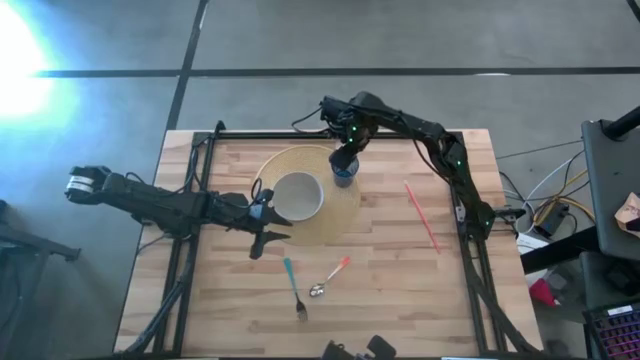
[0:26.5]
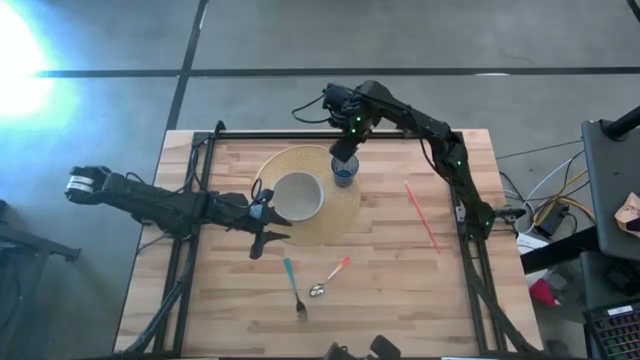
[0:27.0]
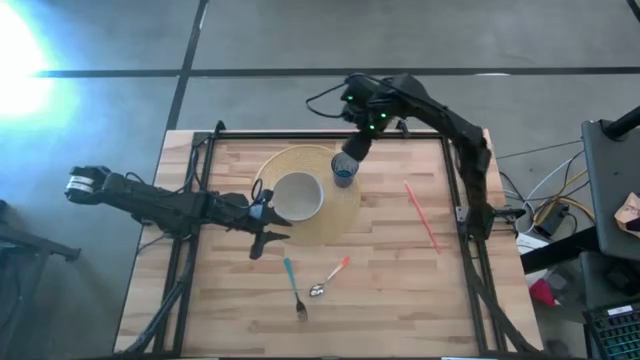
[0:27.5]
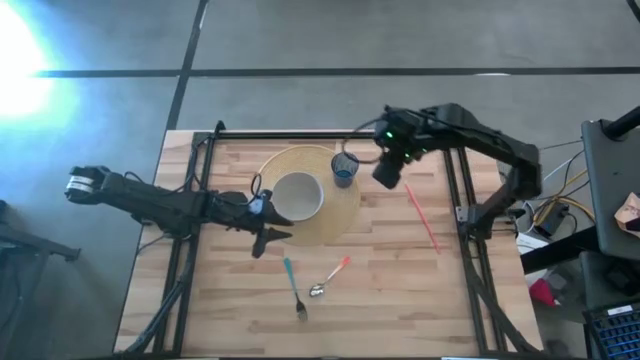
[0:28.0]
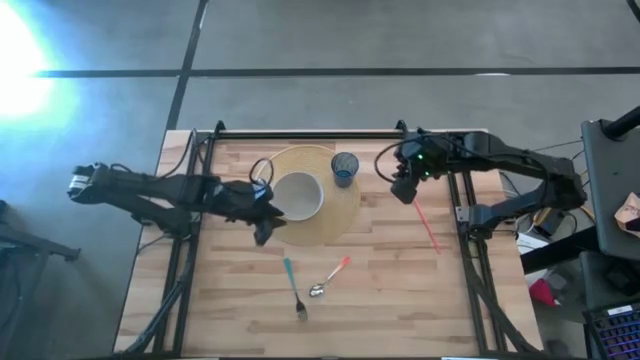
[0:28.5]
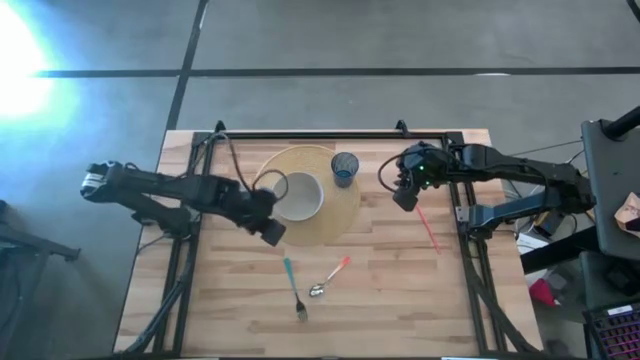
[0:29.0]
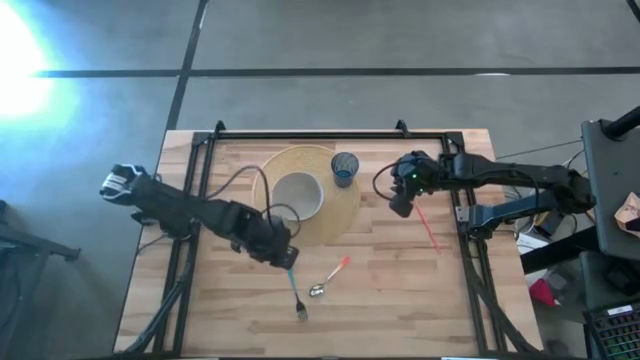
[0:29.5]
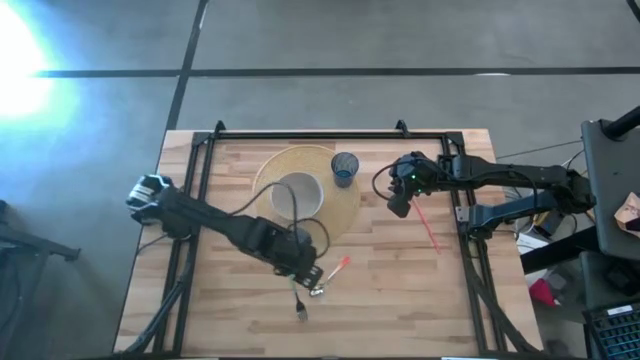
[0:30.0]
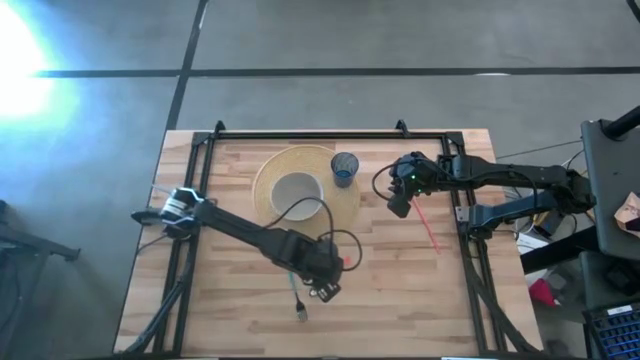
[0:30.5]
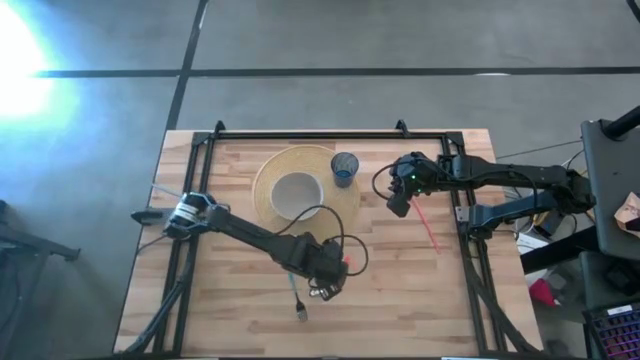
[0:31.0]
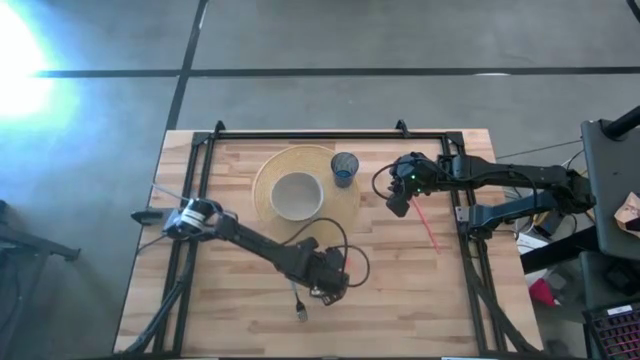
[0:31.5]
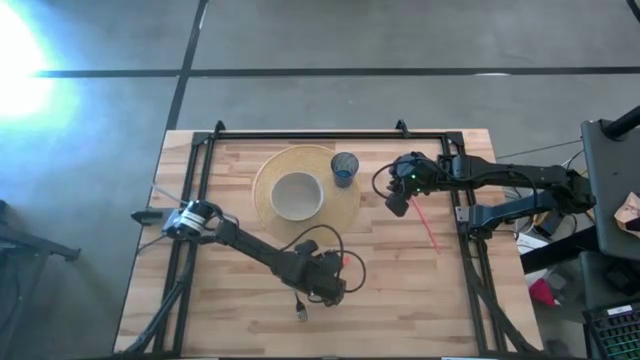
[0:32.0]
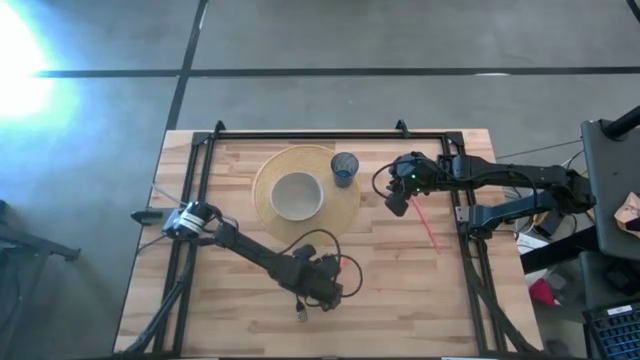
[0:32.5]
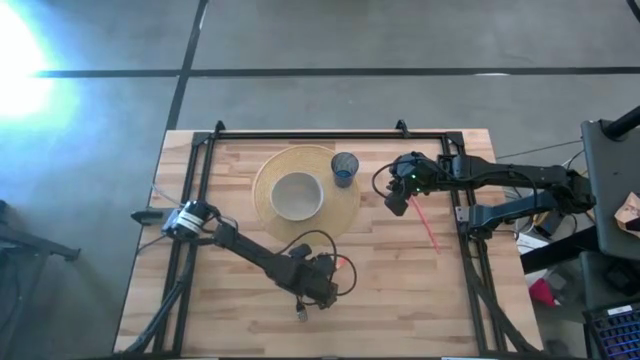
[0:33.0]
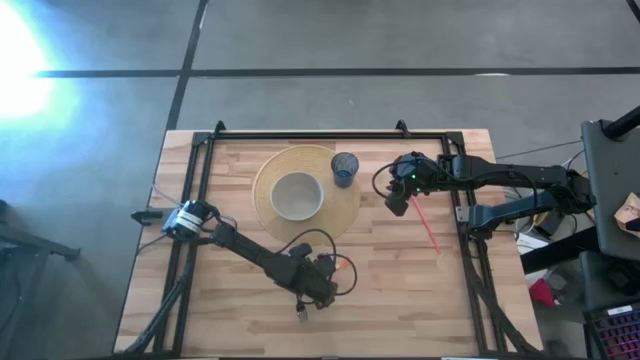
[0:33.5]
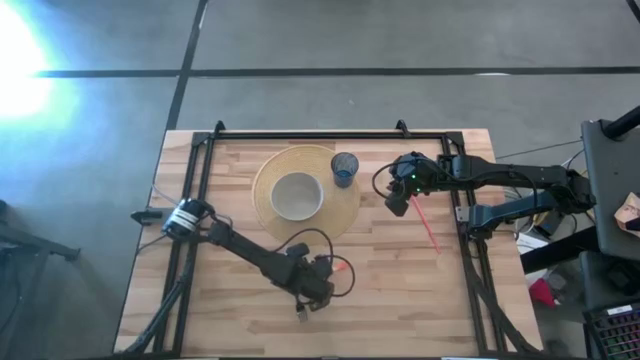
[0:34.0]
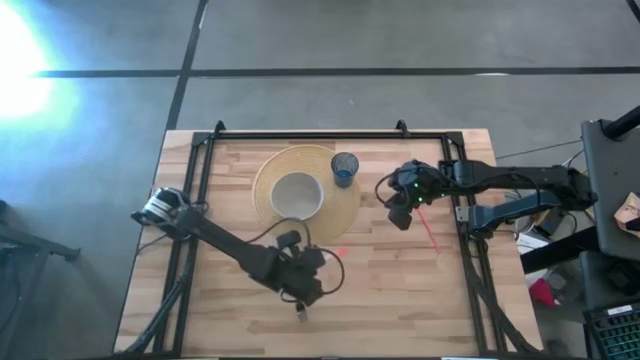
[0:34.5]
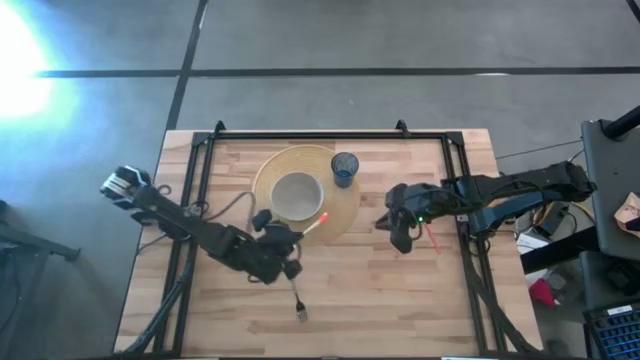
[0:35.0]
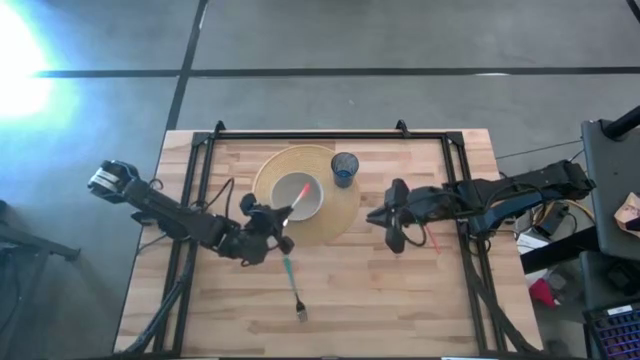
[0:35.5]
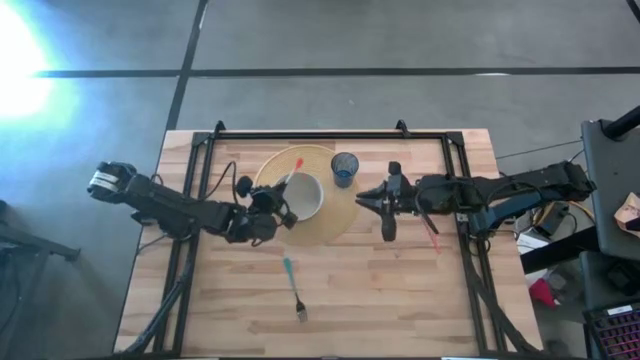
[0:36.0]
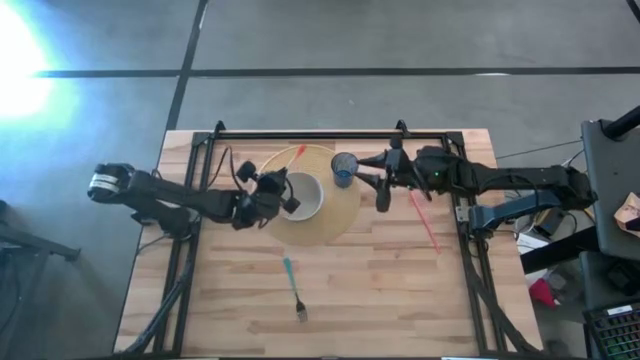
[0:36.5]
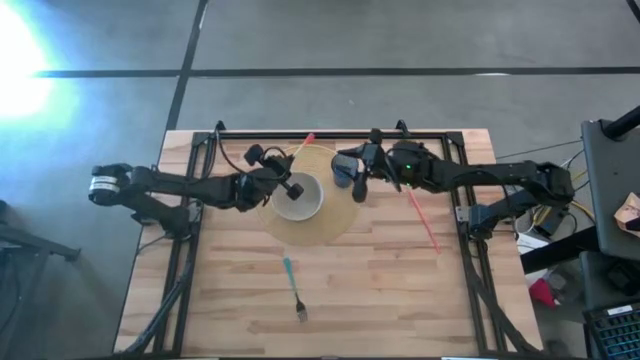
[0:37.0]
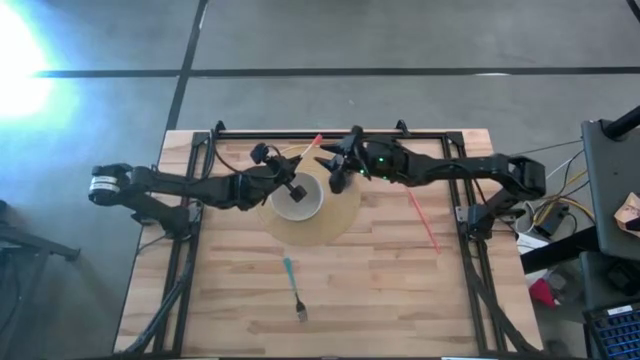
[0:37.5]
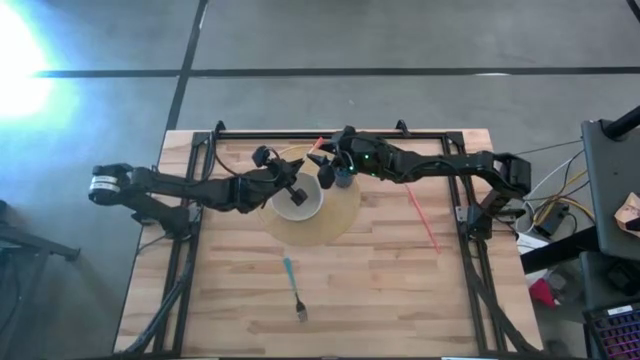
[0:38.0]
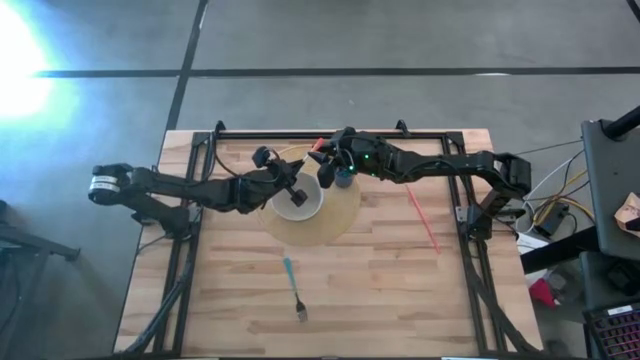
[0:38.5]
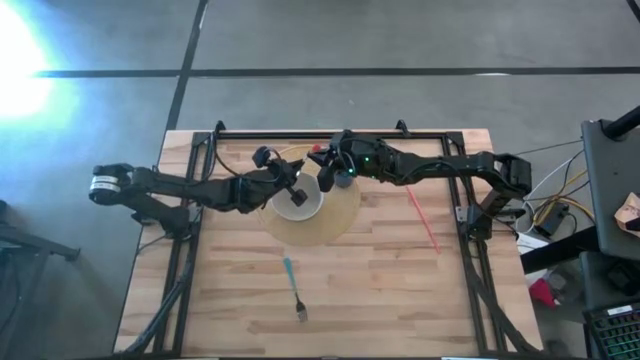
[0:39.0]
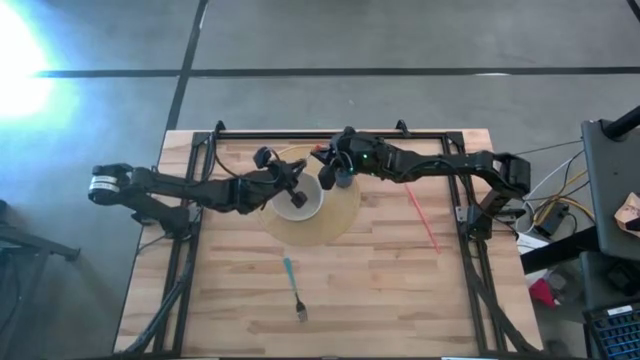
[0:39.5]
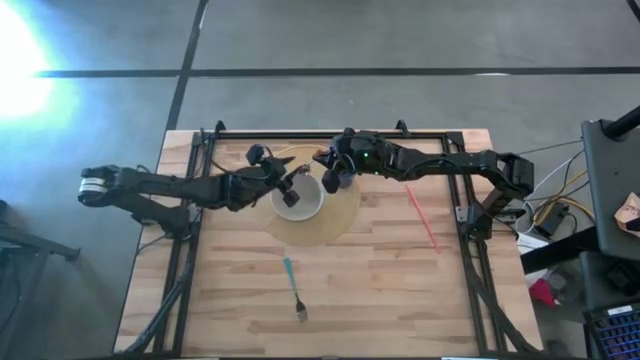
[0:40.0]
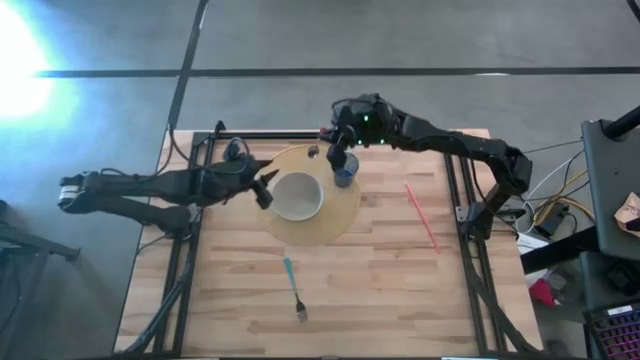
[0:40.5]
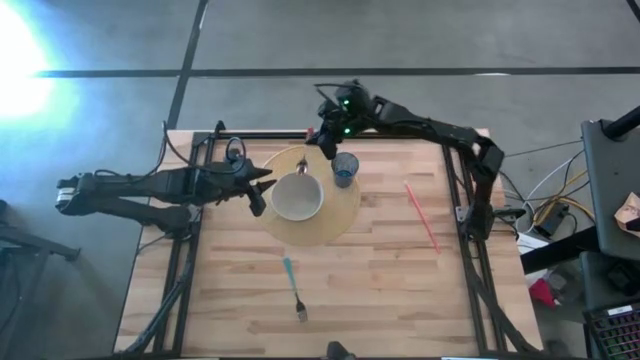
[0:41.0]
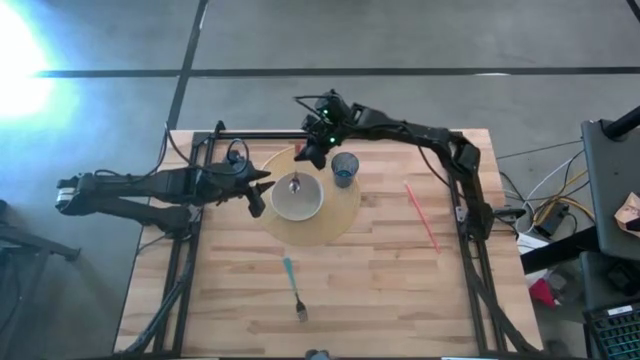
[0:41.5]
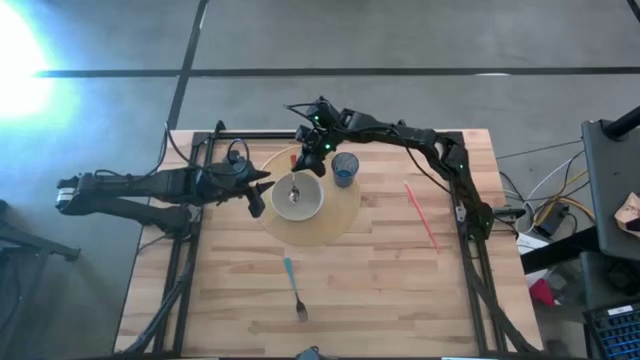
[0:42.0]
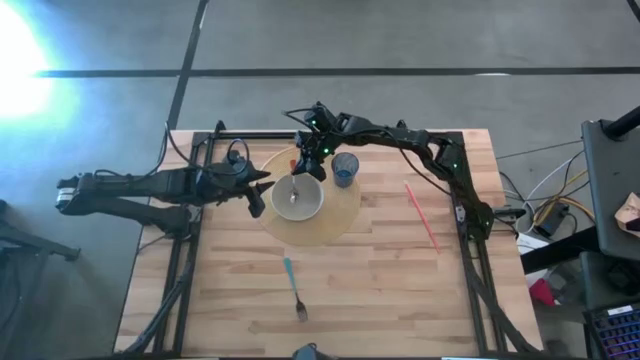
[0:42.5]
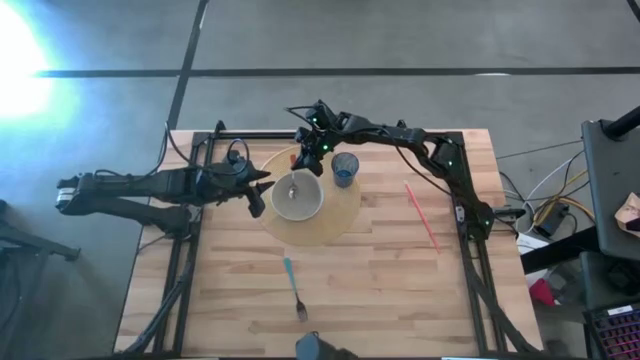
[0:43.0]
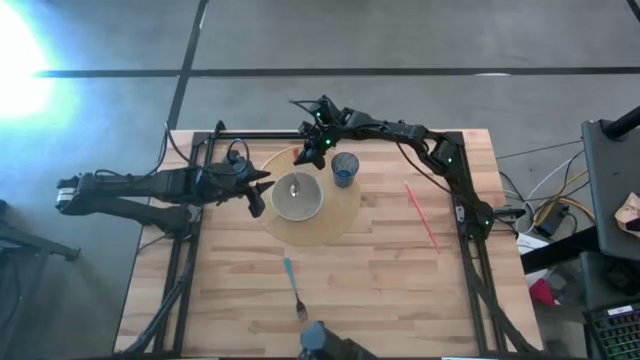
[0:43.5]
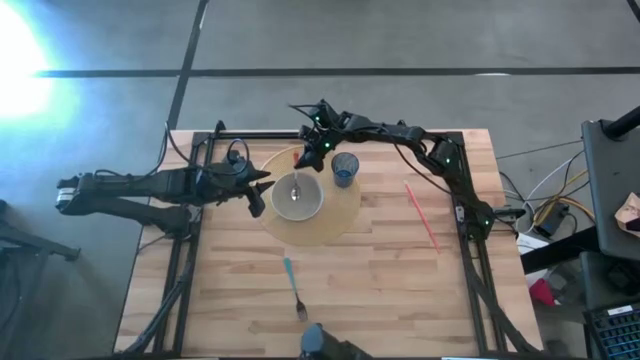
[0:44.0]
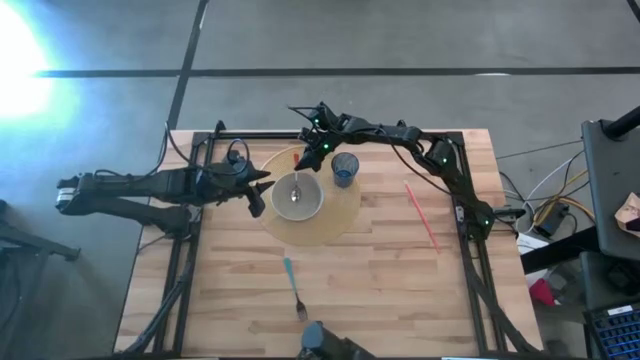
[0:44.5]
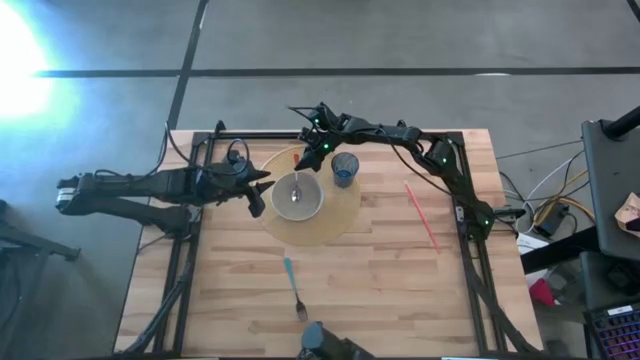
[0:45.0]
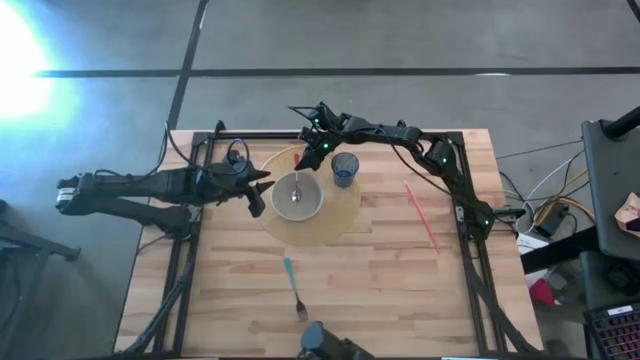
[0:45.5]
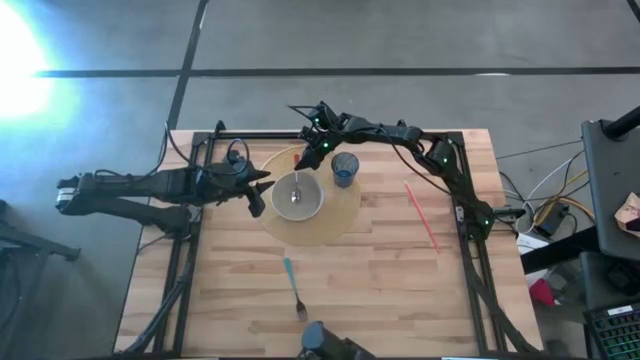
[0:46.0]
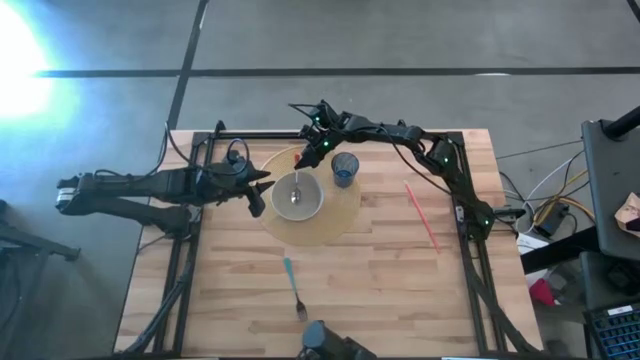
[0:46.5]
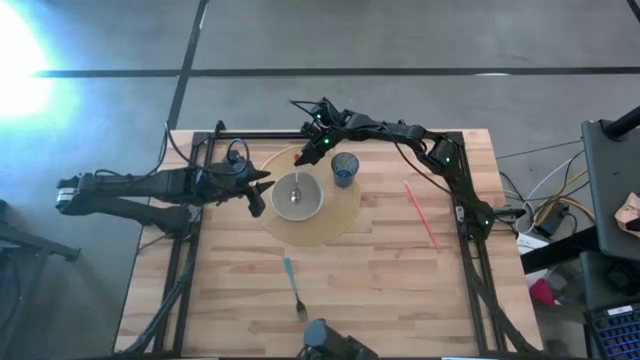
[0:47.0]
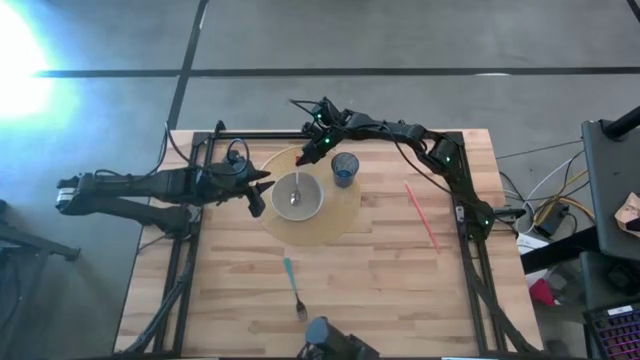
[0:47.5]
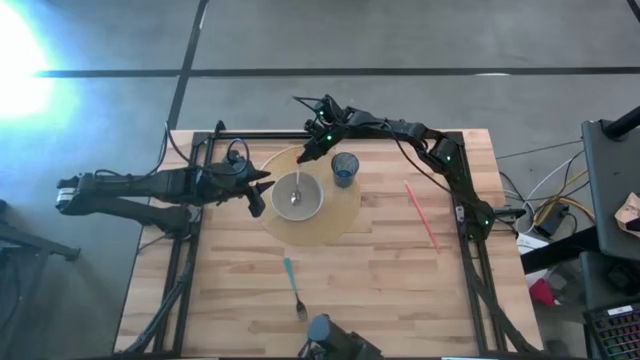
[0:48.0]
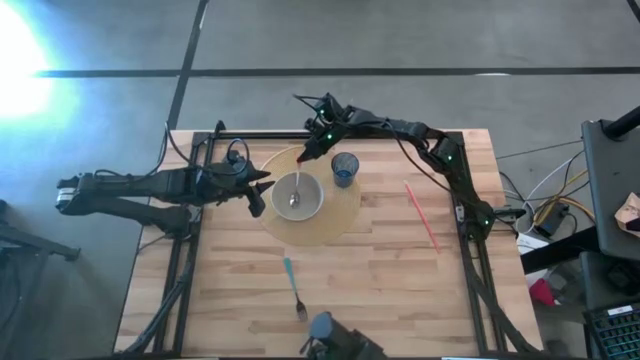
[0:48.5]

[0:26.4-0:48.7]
Task: Pick & Place Utensil
Put the orange spoon into the gray bowl
